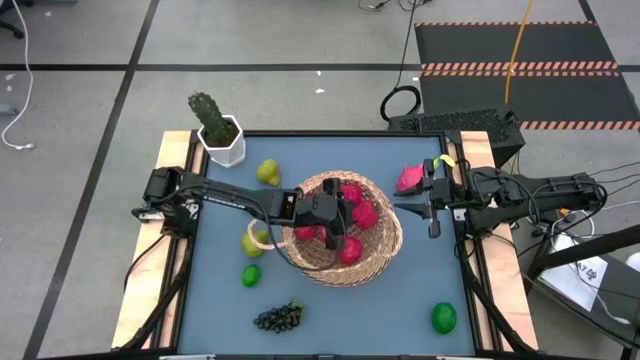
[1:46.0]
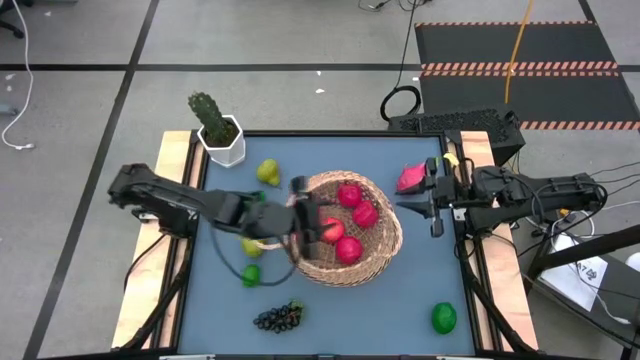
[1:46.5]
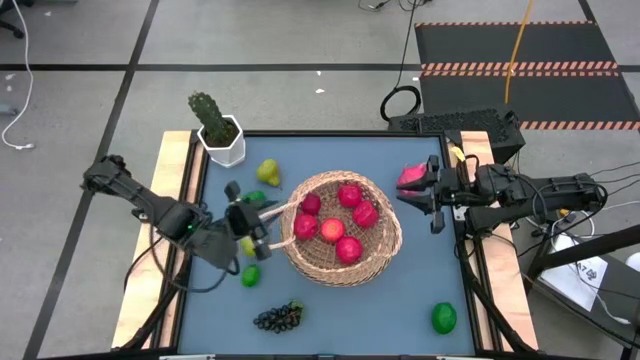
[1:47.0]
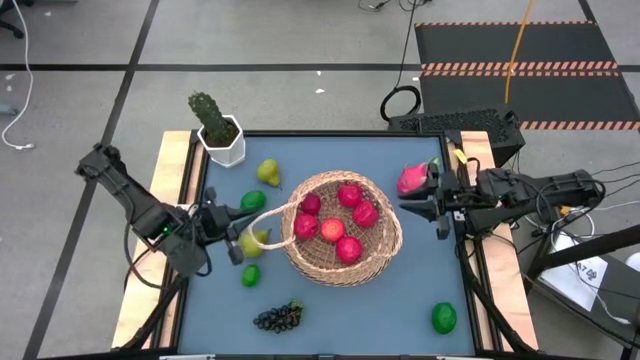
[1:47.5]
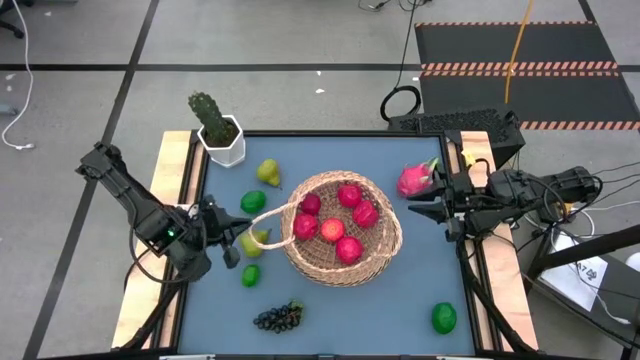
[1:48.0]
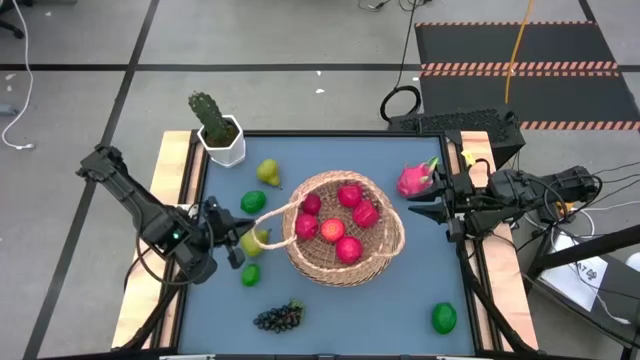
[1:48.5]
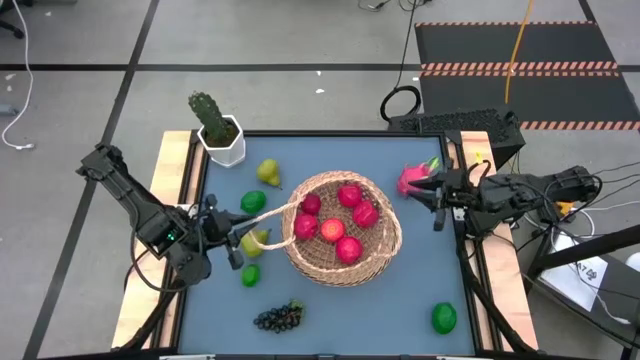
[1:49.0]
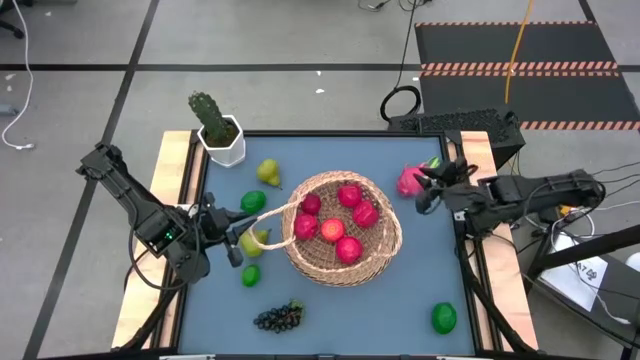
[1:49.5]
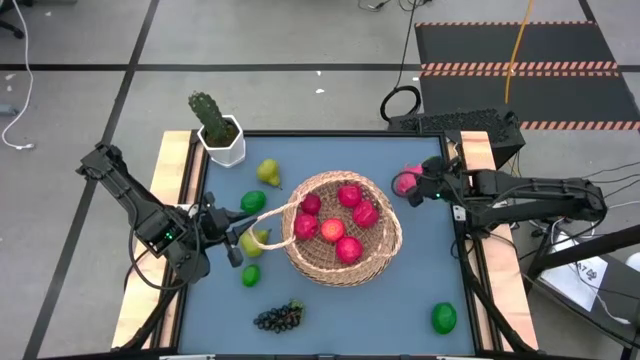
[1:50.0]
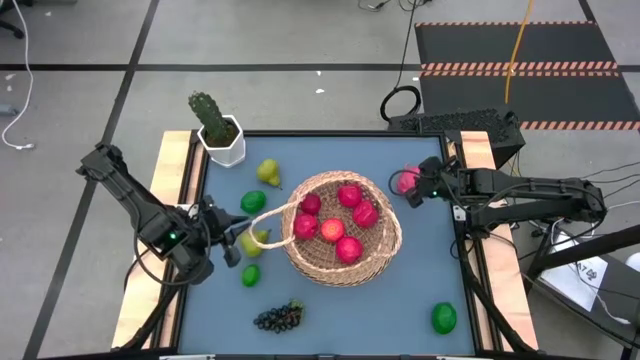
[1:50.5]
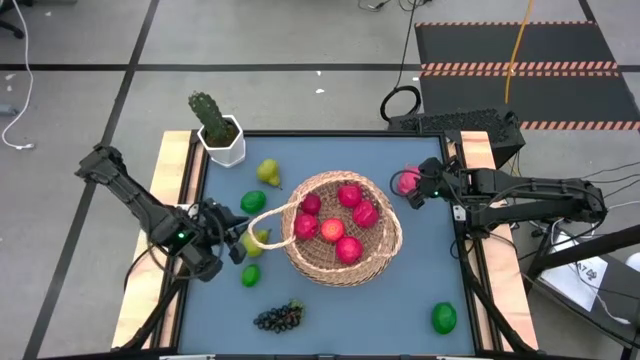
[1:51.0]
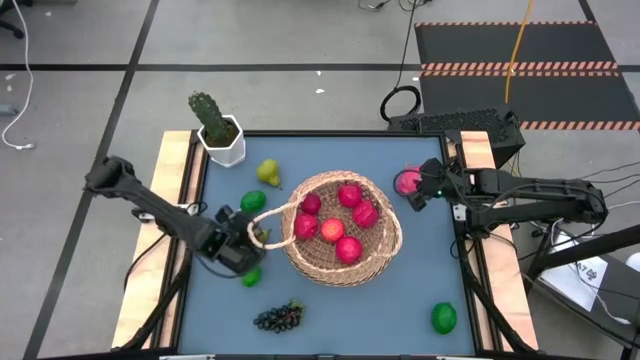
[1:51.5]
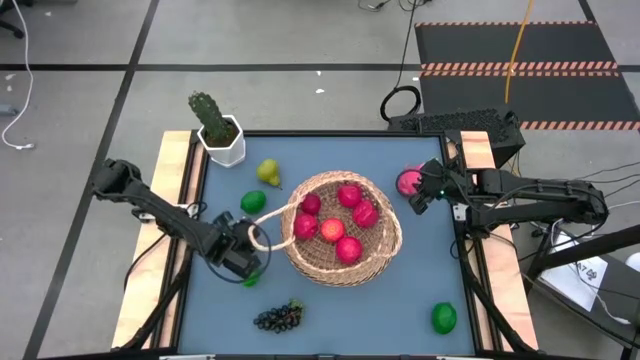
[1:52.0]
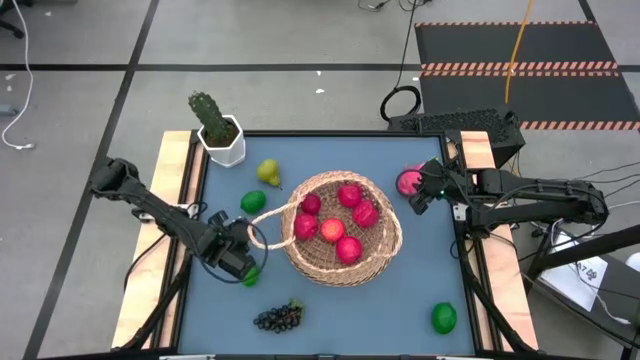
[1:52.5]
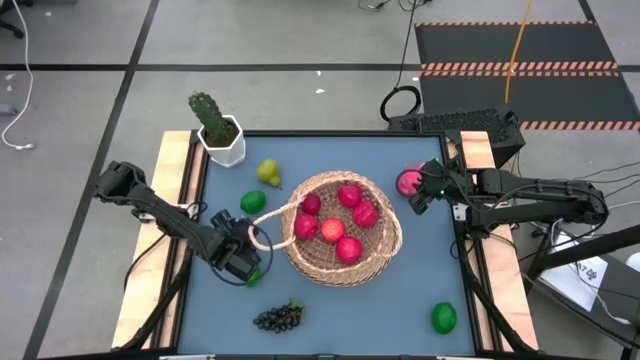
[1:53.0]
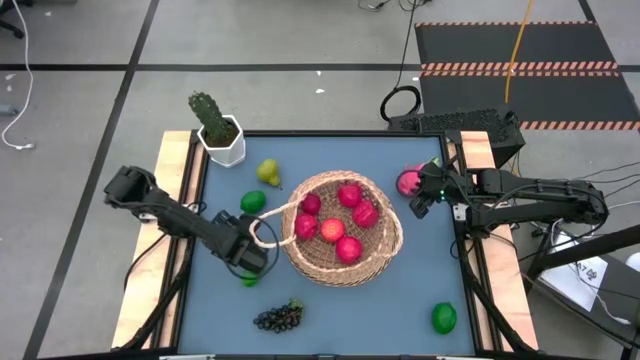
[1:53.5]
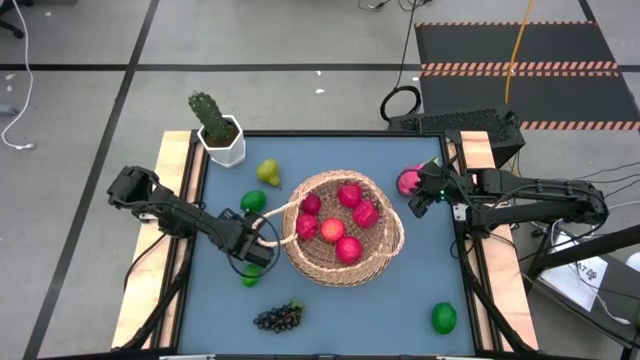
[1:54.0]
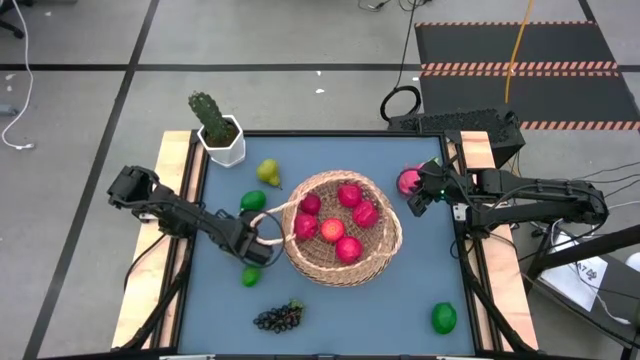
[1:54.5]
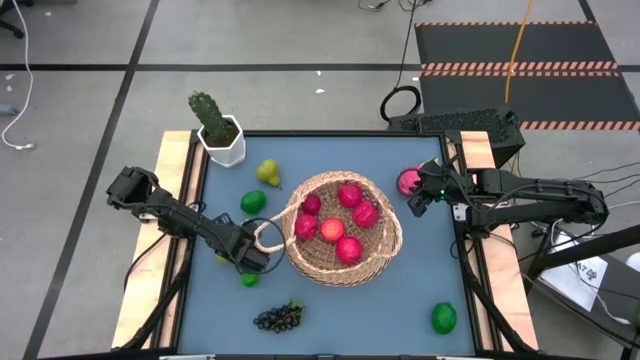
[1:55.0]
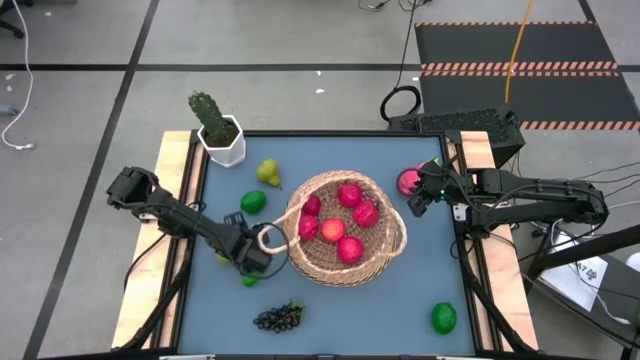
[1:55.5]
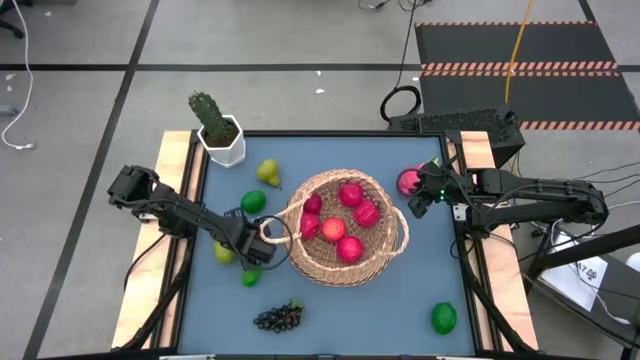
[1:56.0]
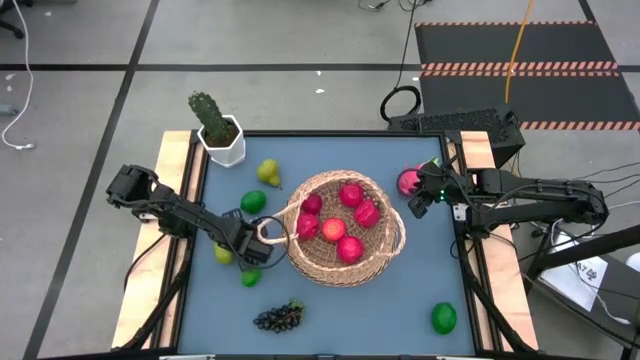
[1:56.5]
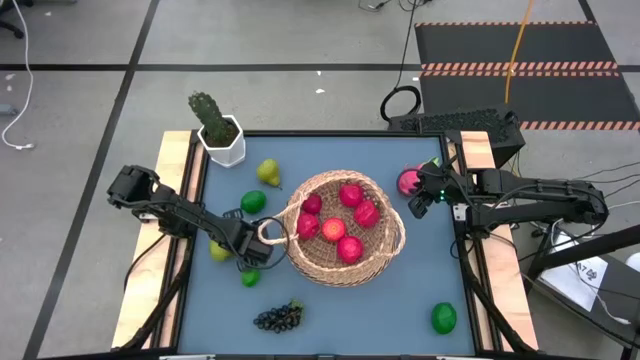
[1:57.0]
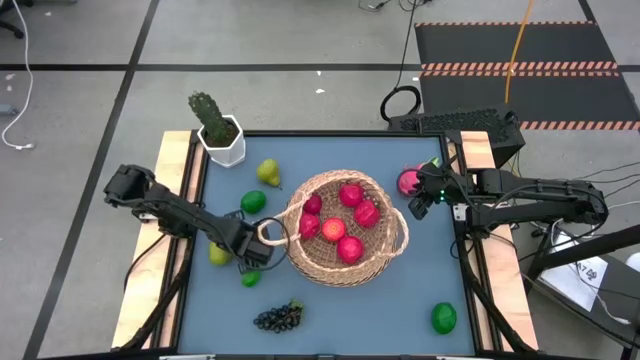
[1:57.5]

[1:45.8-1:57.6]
Task: Build produce basket
Put the bottom light green pear into the brown basket

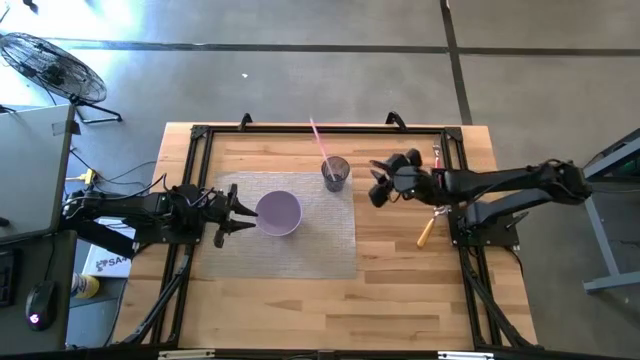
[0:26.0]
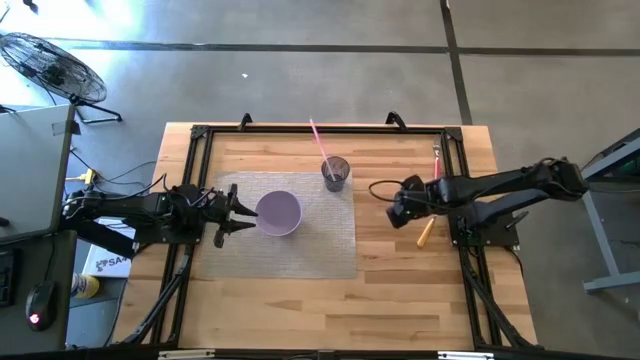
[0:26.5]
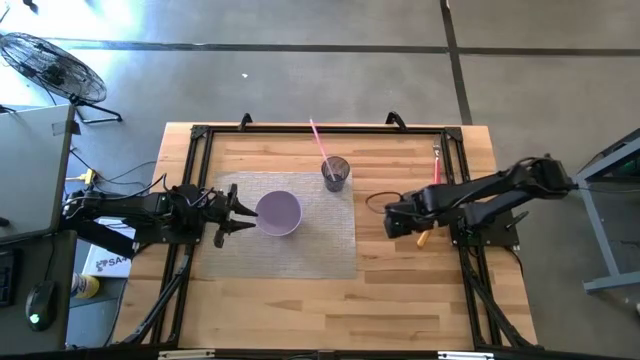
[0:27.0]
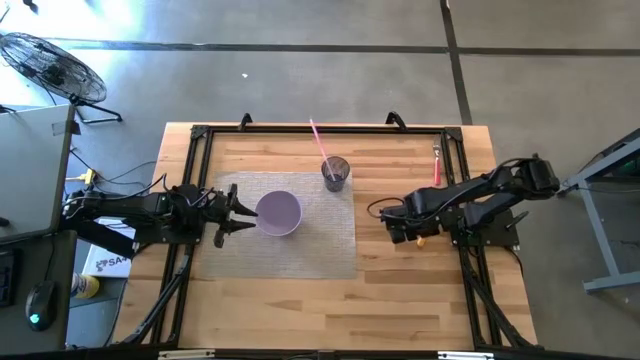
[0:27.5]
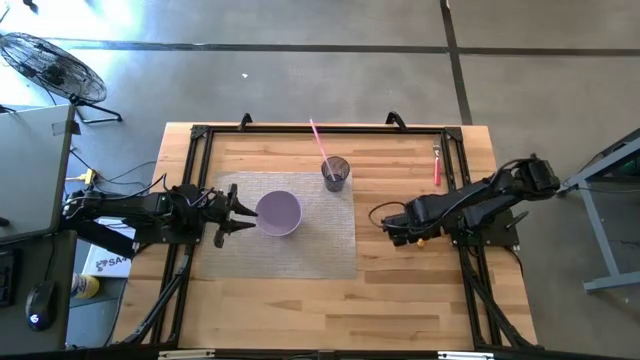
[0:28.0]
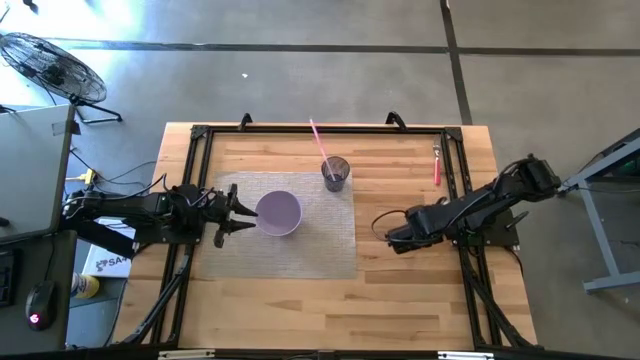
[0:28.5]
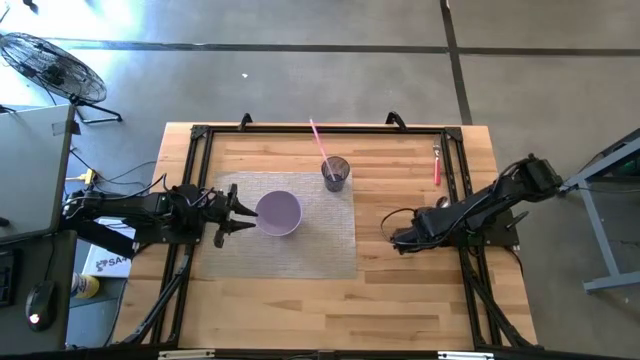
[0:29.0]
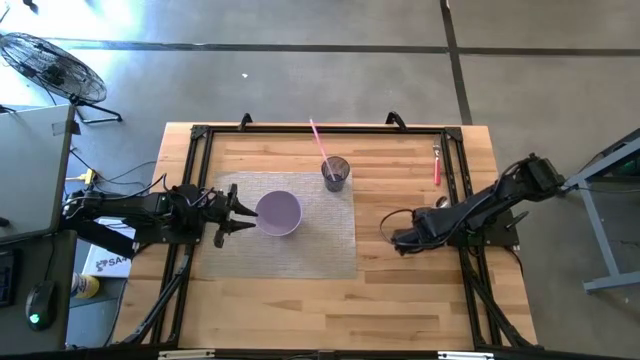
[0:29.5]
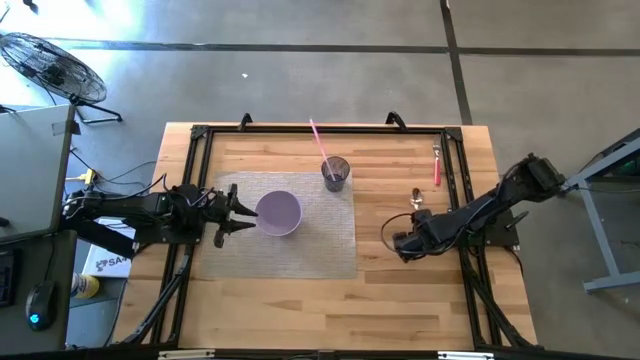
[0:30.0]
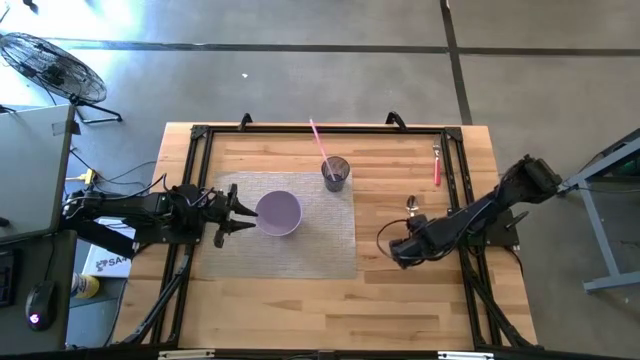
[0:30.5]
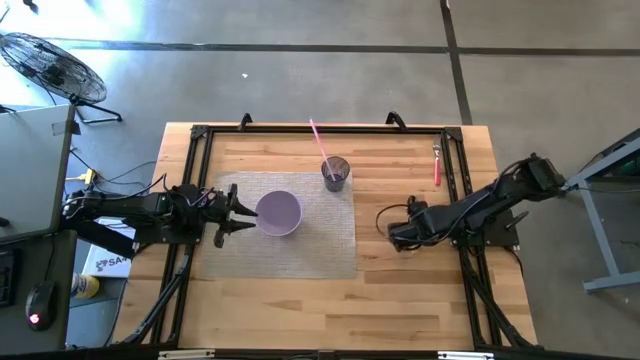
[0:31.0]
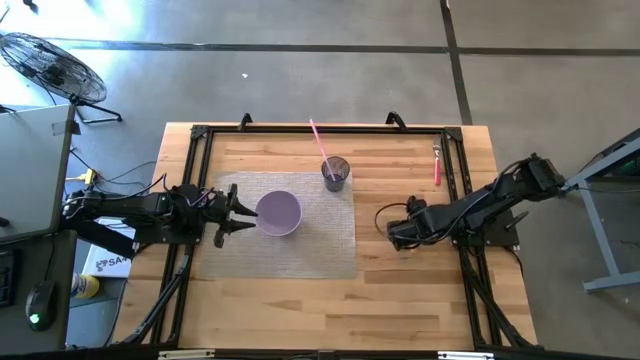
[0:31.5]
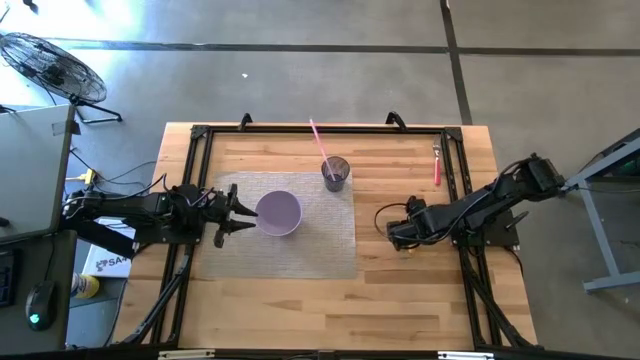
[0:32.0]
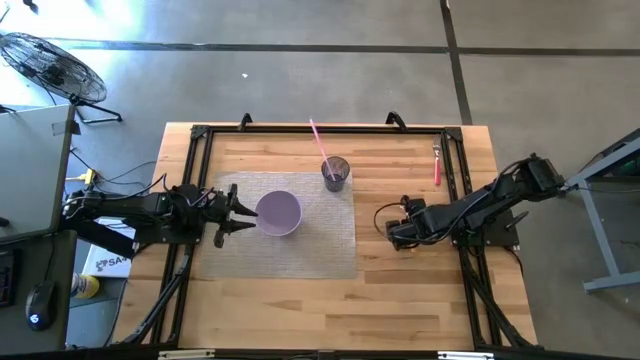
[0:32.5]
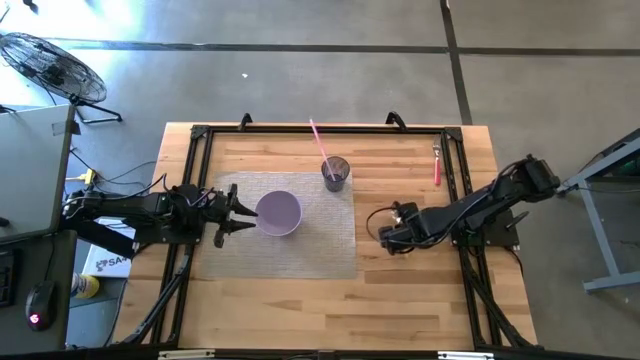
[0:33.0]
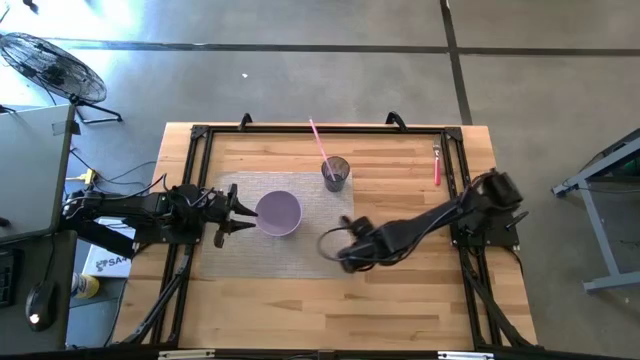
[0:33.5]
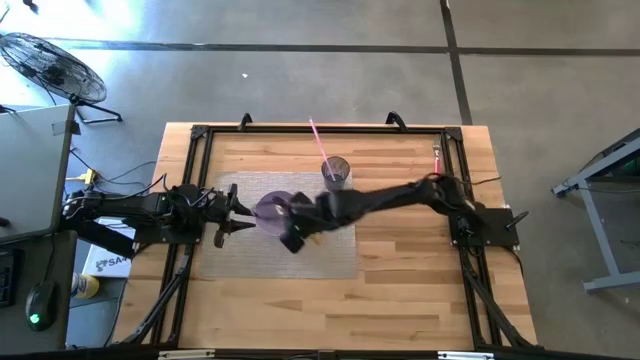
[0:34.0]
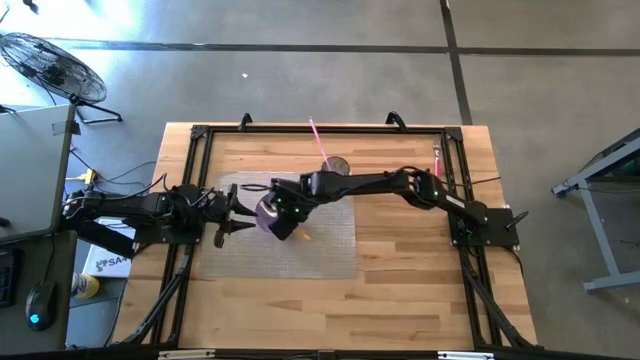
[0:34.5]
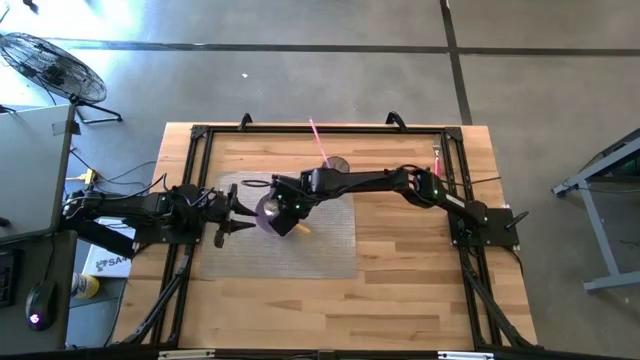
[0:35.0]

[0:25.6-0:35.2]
Task: Pick & Place Utensil
Put the yellow spoon into the purple bowl
